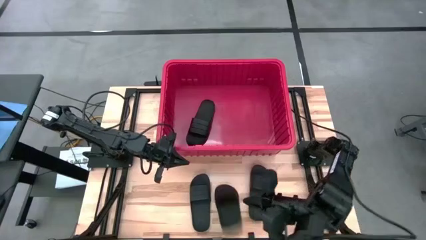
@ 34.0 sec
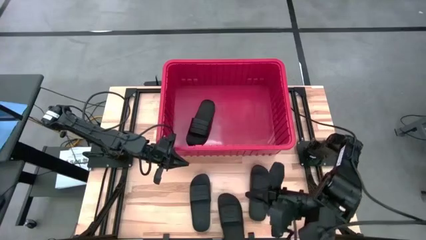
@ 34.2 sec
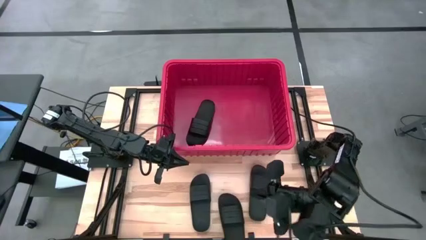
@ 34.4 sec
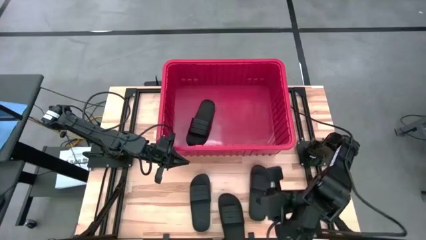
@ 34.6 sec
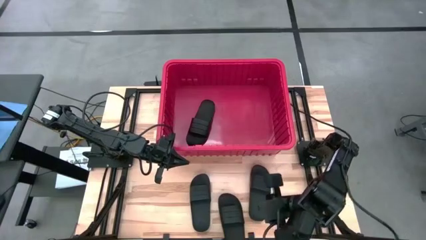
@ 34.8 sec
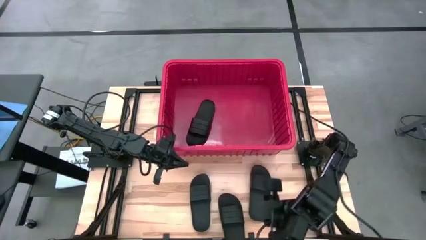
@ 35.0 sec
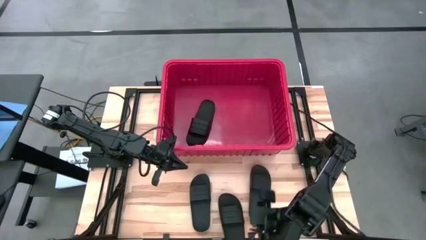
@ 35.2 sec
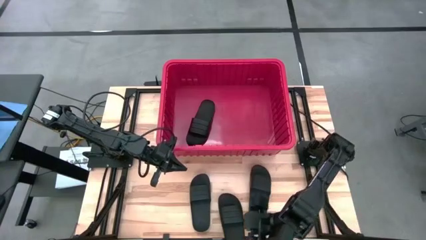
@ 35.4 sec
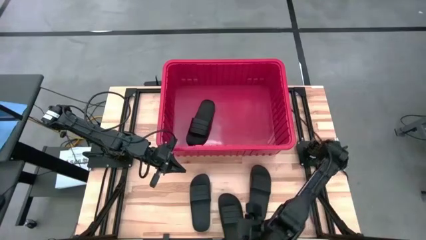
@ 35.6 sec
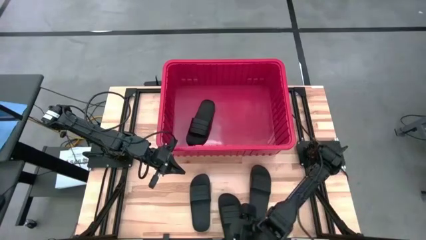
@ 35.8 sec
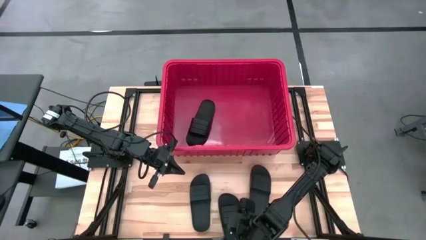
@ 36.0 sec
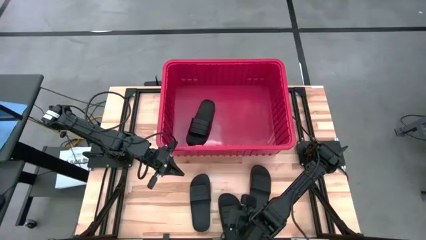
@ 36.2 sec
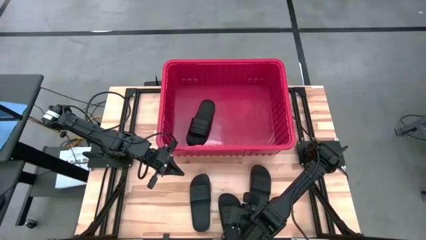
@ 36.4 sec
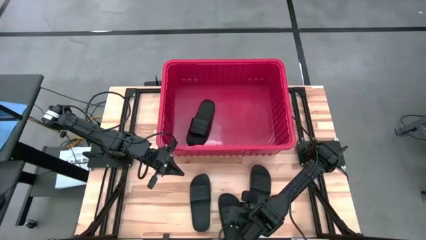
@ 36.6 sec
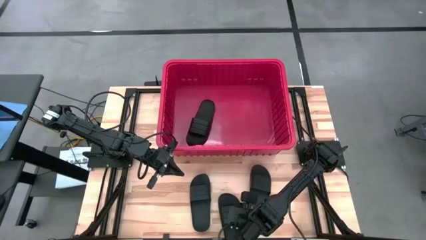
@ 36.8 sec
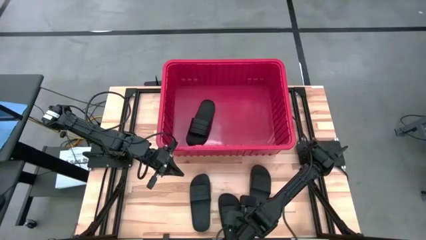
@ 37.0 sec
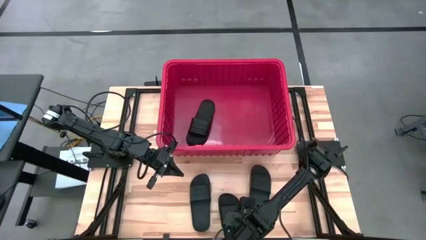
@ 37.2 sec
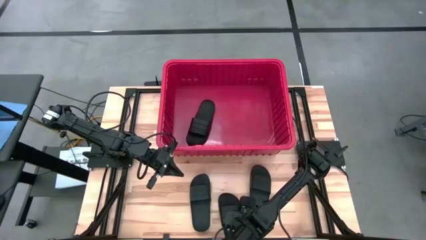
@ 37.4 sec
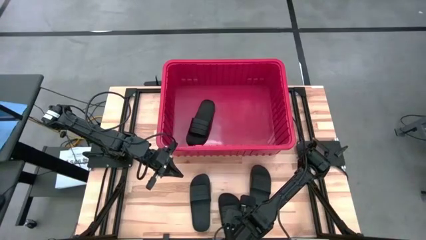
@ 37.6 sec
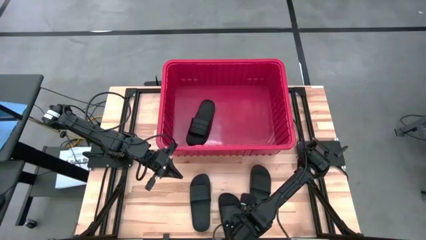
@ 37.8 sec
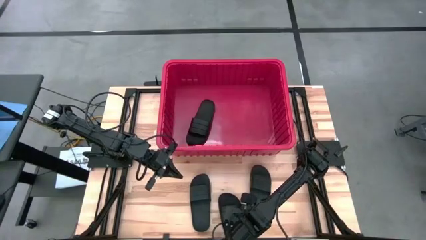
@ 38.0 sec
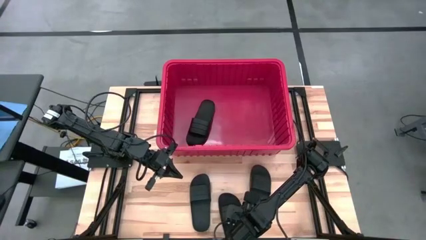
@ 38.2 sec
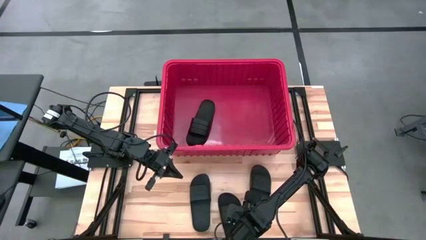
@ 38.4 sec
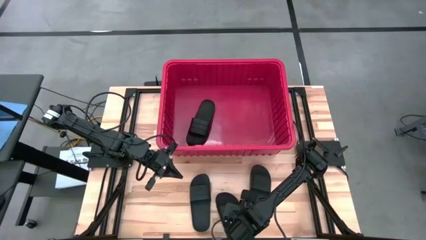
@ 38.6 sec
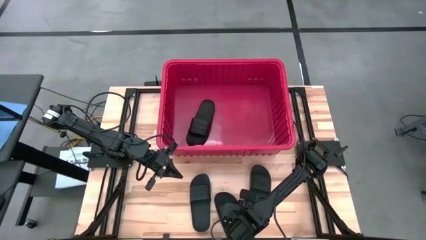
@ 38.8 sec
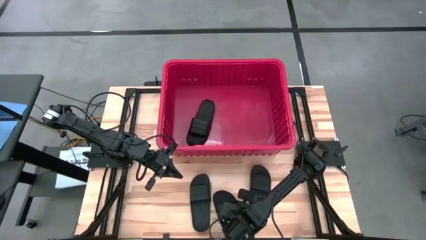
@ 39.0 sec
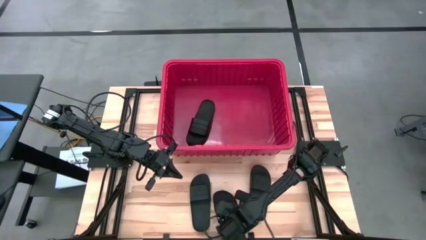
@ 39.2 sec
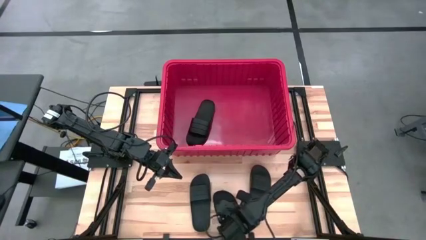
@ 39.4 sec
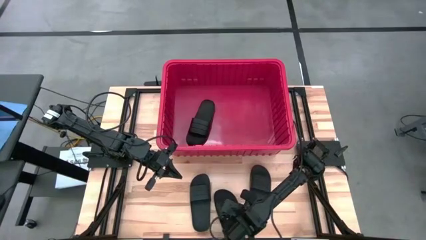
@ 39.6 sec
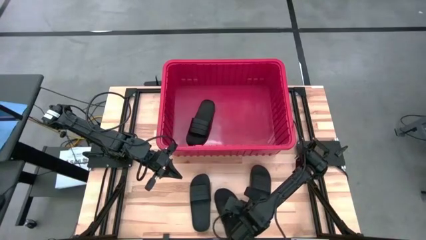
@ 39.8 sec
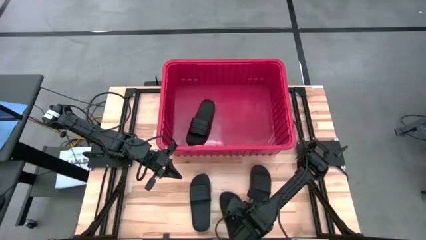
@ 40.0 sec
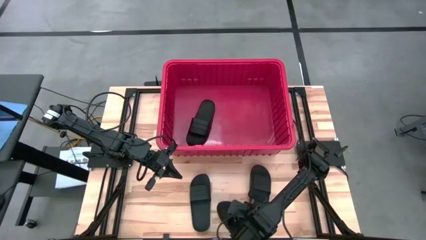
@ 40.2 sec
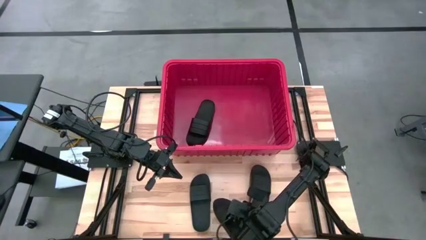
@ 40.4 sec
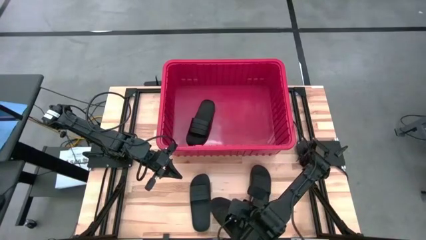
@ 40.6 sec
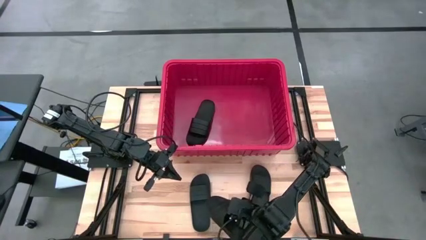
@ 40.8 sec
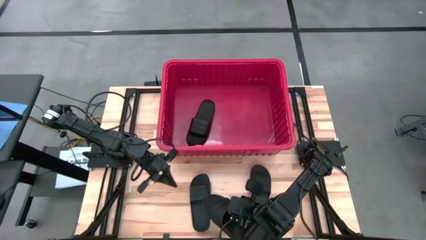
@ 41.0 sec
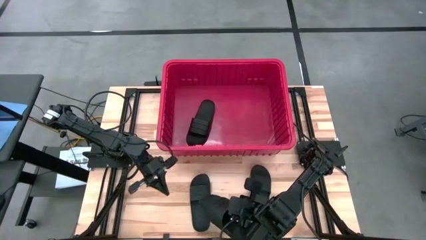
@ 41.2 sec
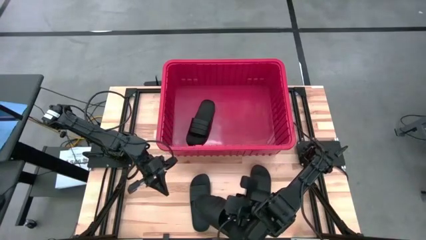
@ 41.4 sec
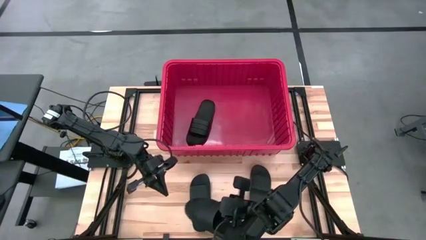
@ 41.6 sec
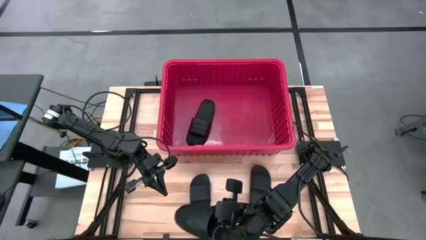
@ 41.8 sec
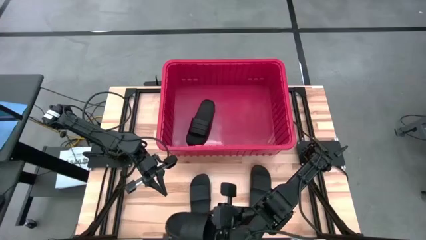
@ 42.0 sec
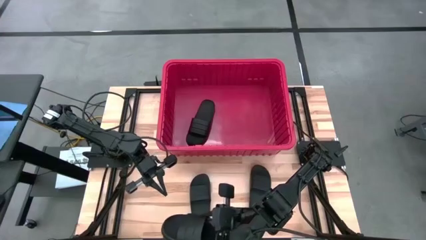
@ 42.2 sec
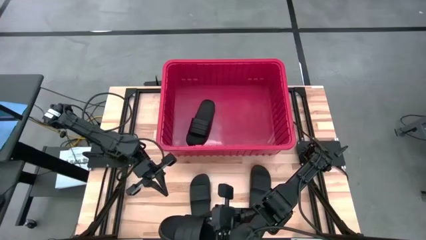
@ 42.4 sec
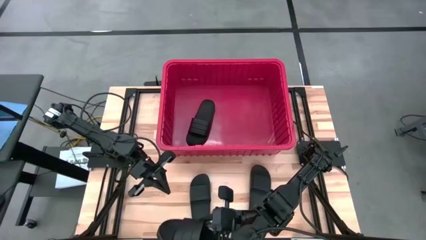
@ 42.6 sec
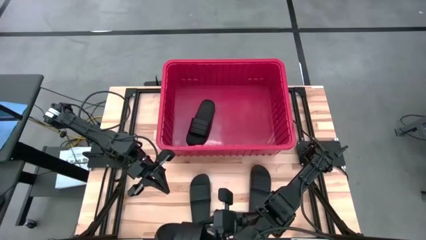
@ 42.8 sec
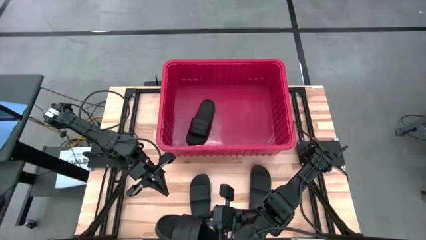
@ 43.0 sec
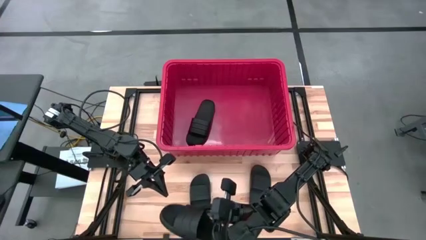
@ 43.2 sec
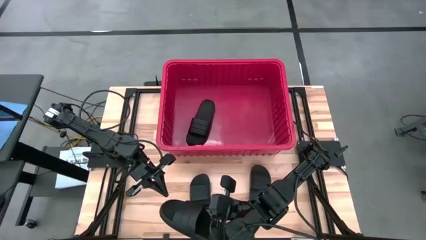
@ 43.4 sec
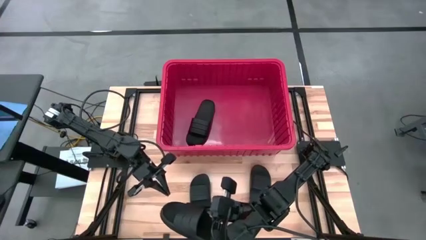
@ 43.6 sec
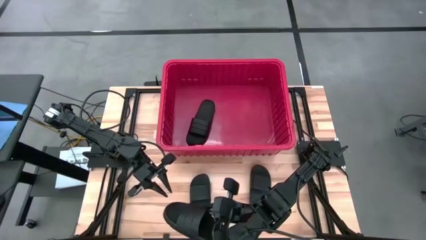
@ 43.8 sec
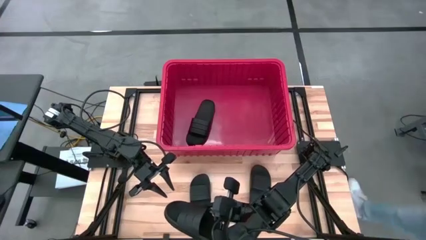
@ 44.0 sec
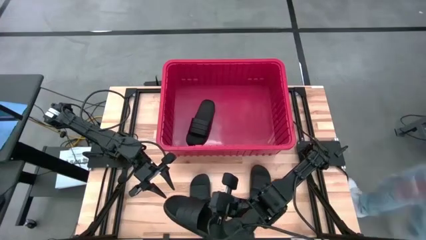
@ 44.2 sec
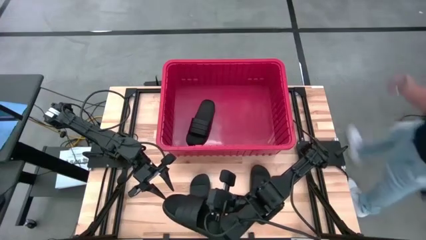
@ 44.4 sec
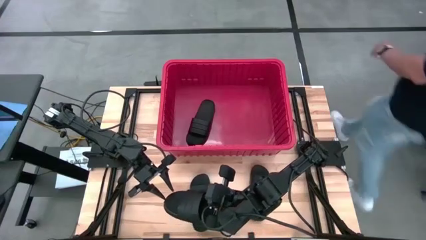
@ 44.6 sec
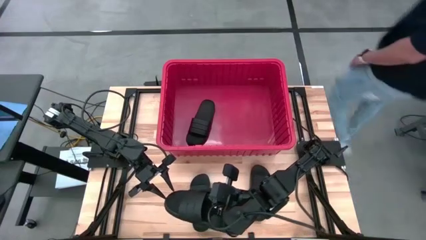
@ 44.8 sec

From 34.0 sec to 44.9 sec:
Task: Pick and place slides into bin
Put the black slide into the red bin
